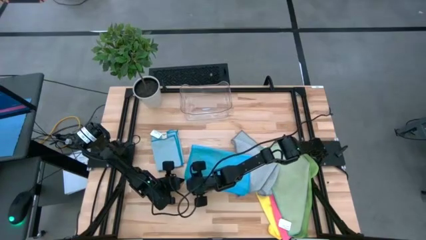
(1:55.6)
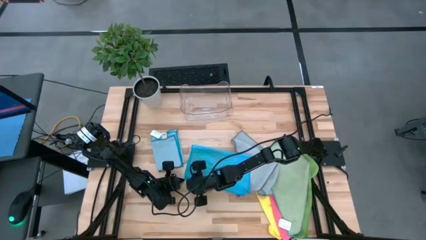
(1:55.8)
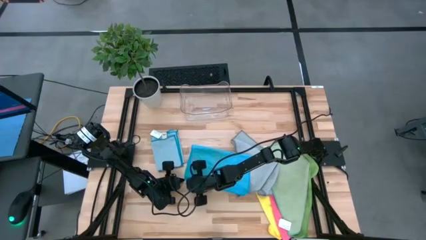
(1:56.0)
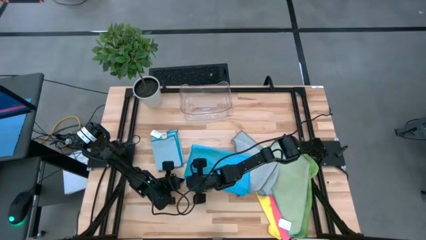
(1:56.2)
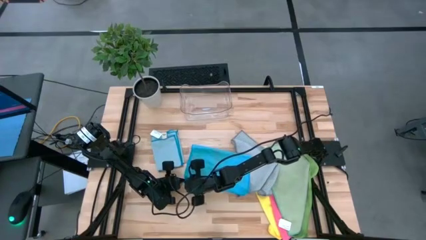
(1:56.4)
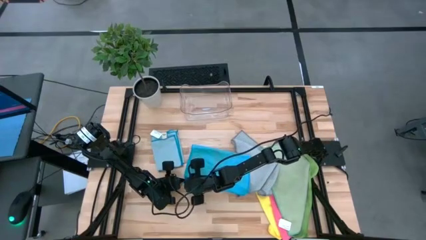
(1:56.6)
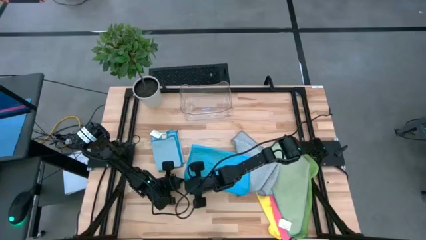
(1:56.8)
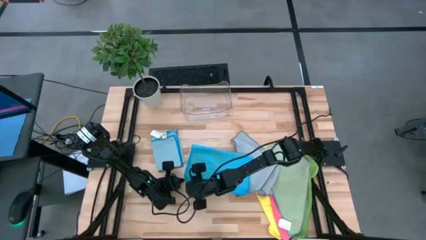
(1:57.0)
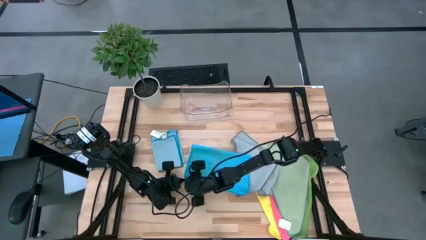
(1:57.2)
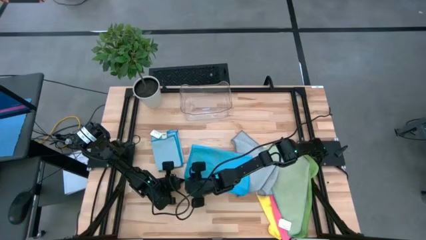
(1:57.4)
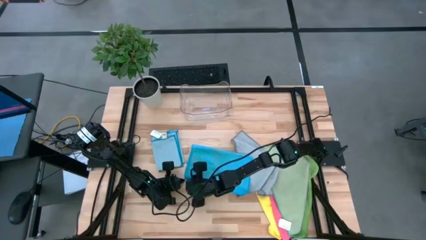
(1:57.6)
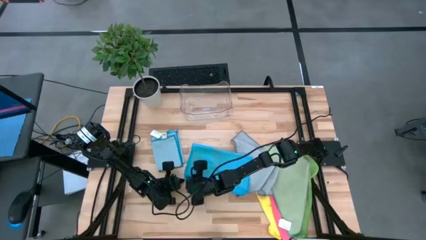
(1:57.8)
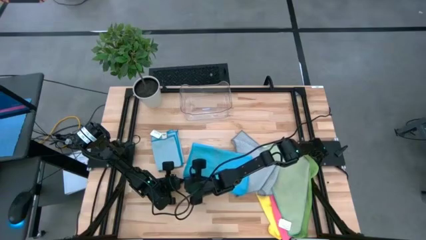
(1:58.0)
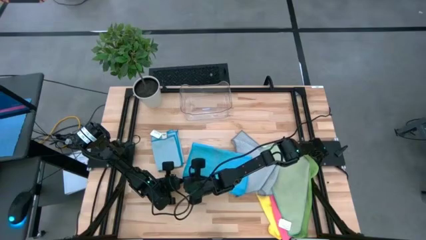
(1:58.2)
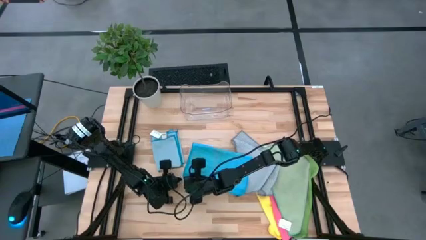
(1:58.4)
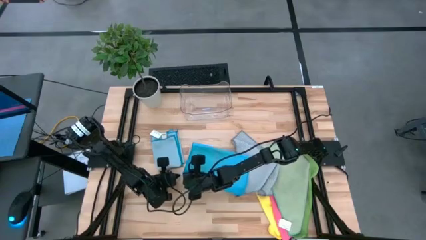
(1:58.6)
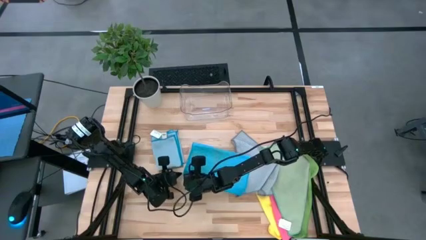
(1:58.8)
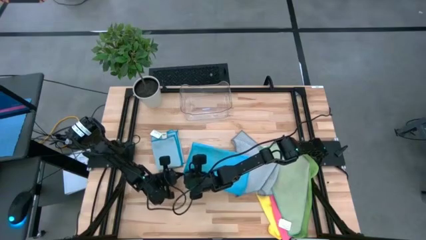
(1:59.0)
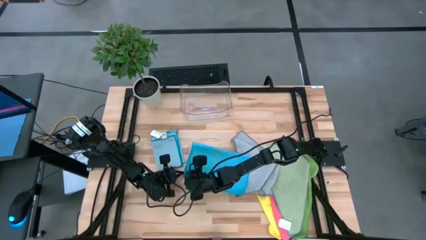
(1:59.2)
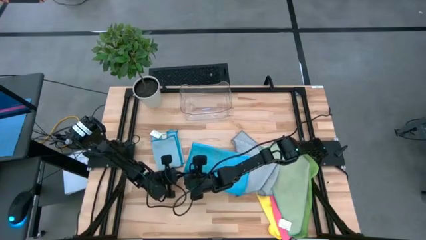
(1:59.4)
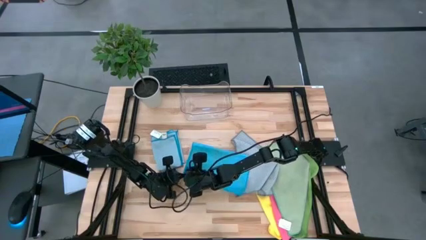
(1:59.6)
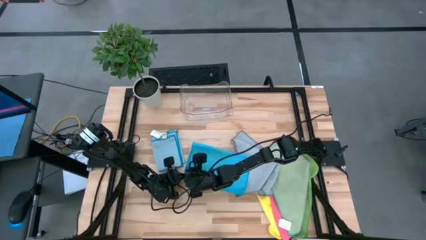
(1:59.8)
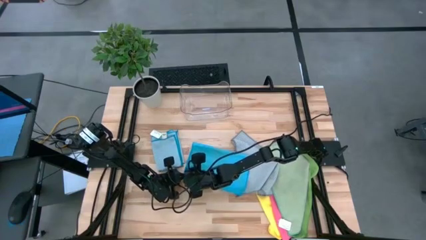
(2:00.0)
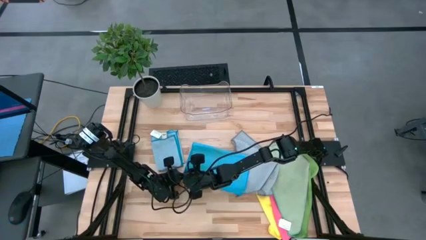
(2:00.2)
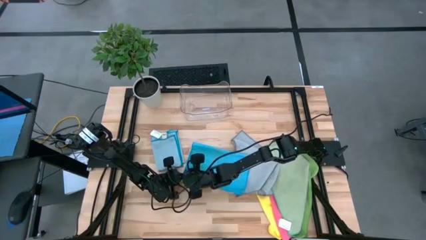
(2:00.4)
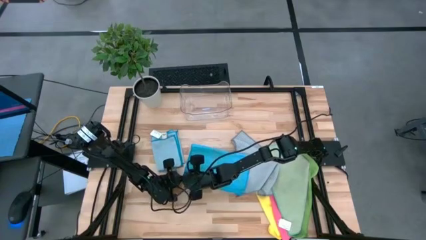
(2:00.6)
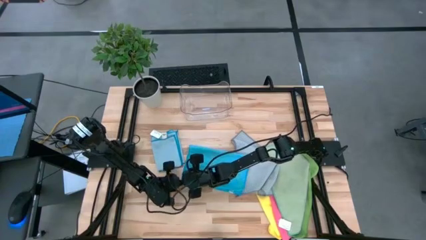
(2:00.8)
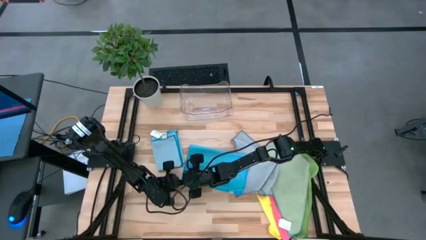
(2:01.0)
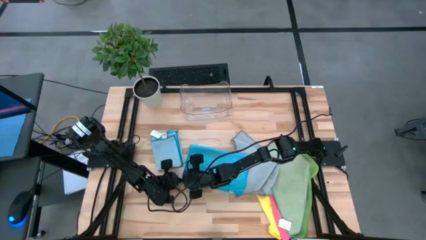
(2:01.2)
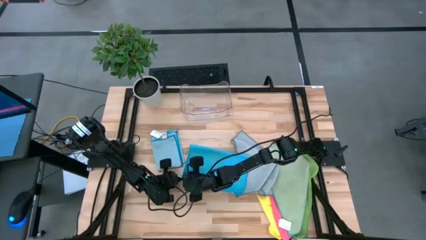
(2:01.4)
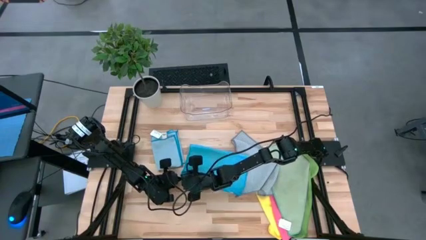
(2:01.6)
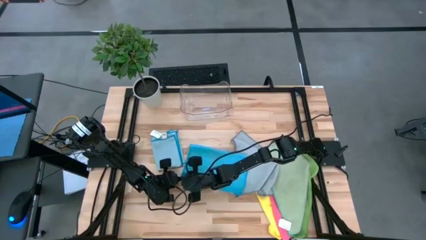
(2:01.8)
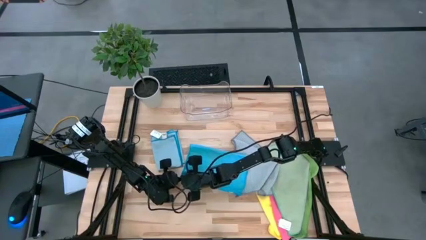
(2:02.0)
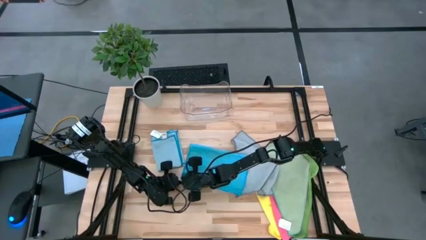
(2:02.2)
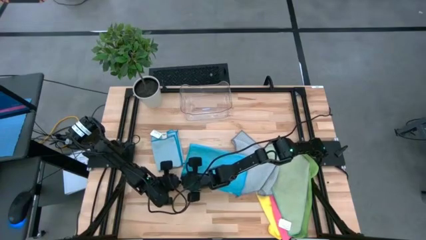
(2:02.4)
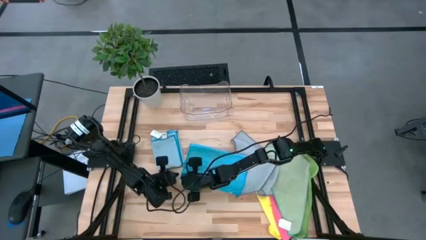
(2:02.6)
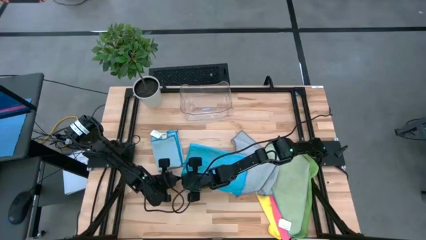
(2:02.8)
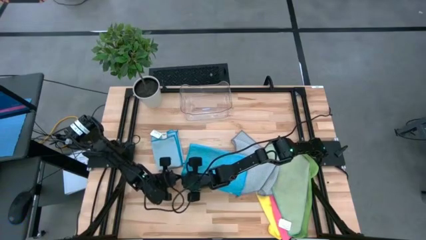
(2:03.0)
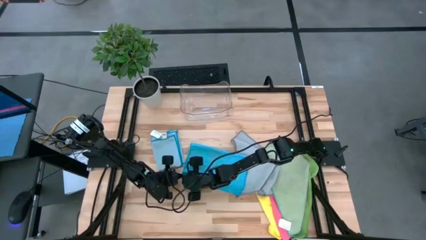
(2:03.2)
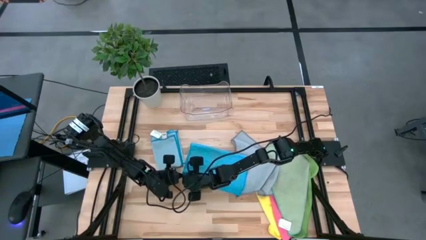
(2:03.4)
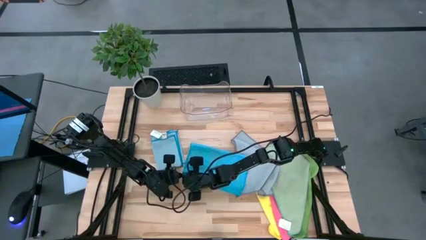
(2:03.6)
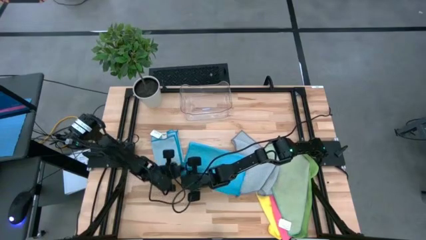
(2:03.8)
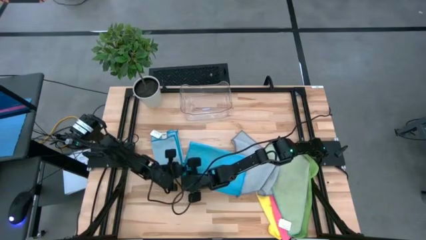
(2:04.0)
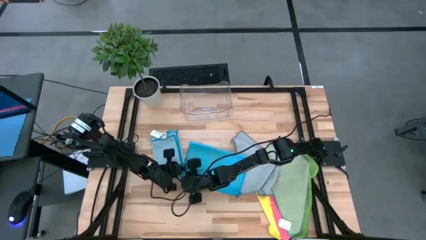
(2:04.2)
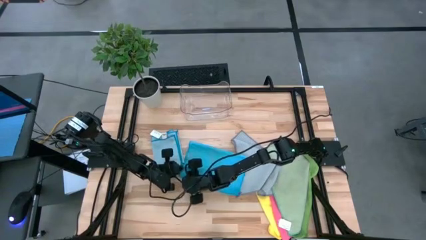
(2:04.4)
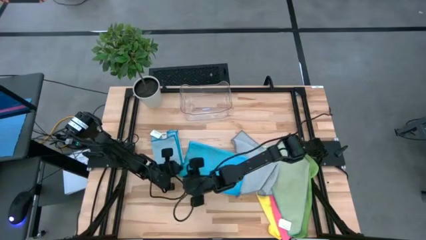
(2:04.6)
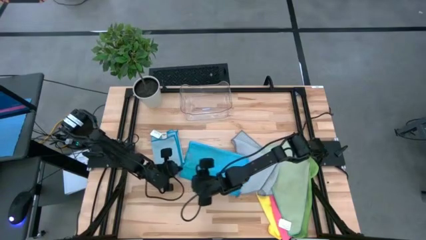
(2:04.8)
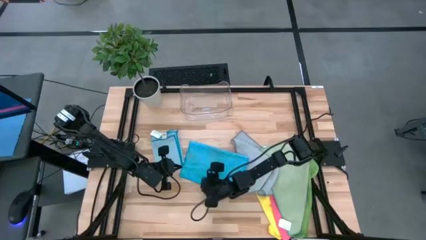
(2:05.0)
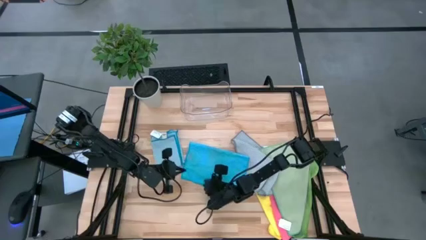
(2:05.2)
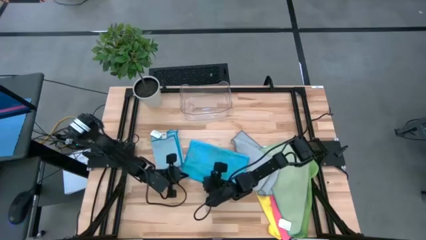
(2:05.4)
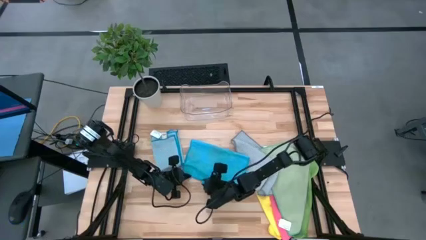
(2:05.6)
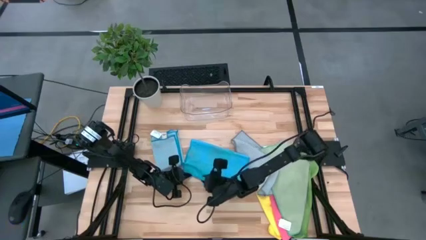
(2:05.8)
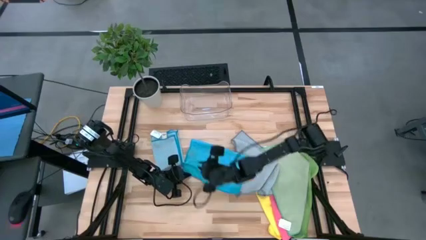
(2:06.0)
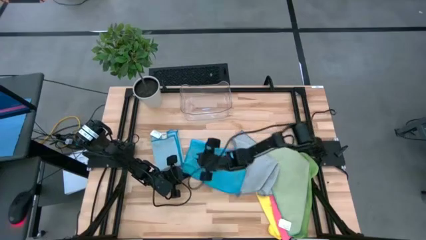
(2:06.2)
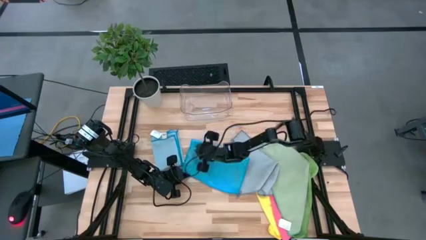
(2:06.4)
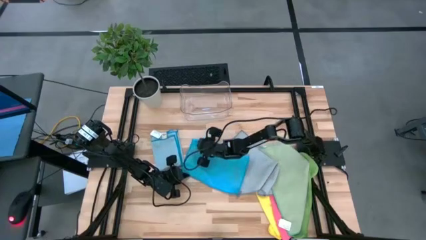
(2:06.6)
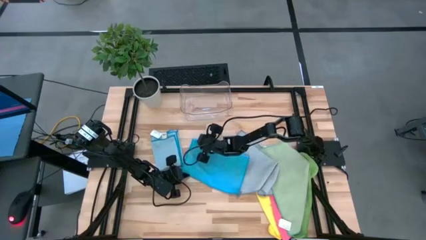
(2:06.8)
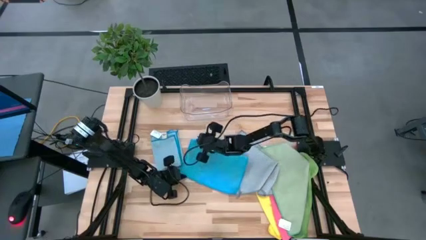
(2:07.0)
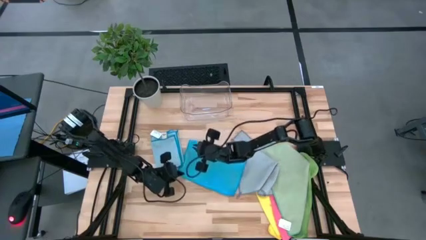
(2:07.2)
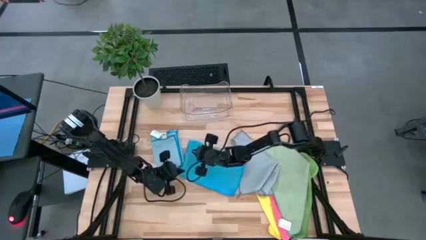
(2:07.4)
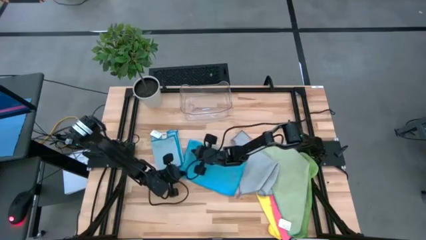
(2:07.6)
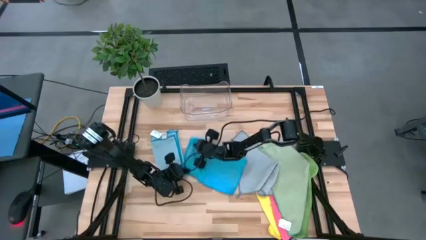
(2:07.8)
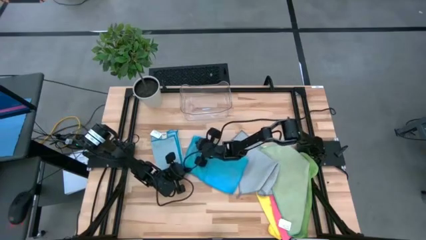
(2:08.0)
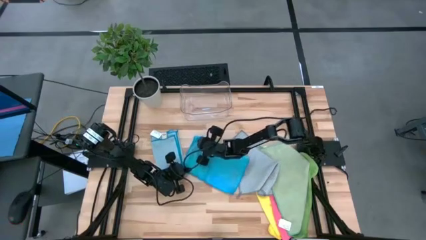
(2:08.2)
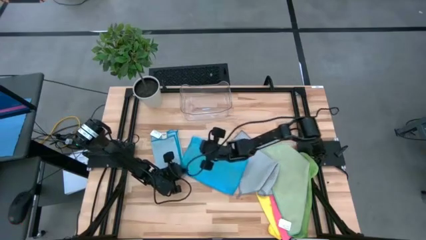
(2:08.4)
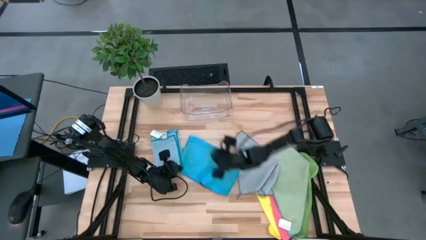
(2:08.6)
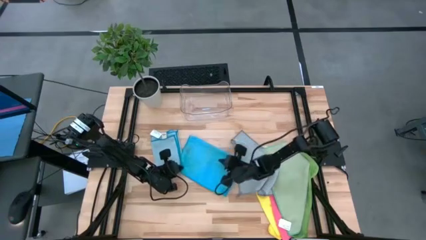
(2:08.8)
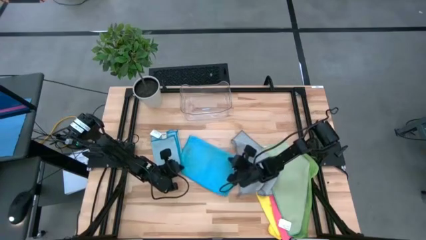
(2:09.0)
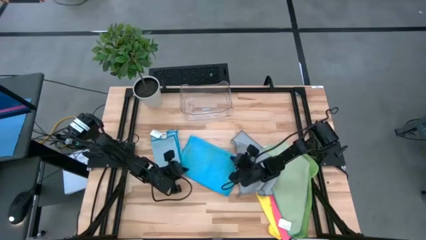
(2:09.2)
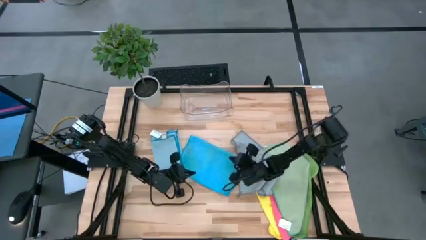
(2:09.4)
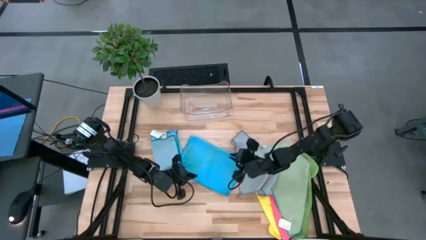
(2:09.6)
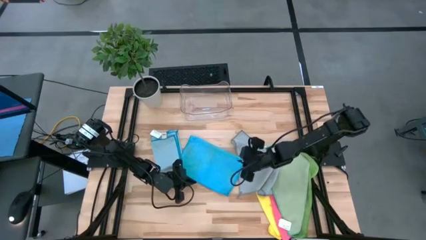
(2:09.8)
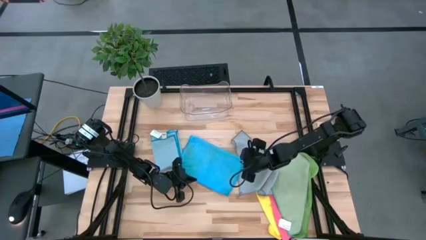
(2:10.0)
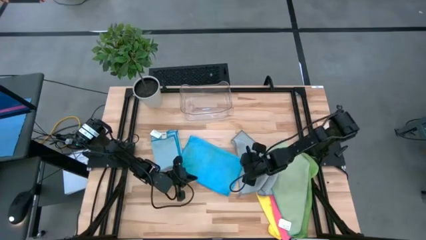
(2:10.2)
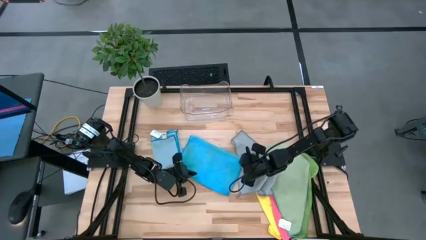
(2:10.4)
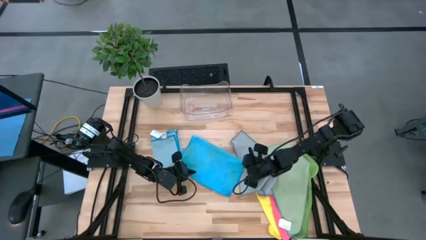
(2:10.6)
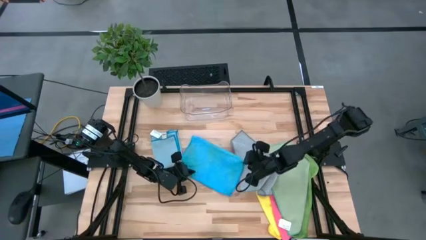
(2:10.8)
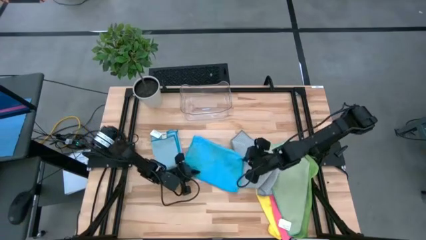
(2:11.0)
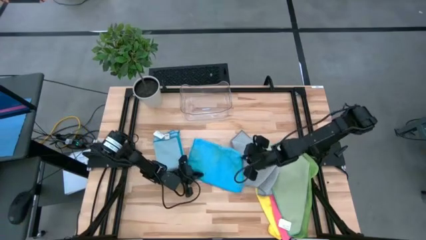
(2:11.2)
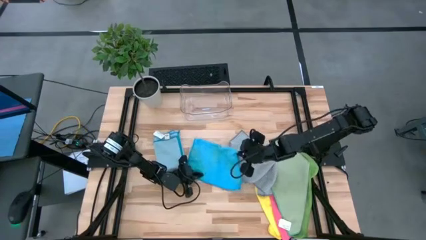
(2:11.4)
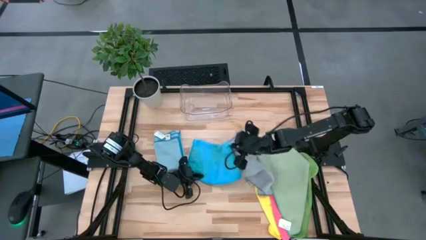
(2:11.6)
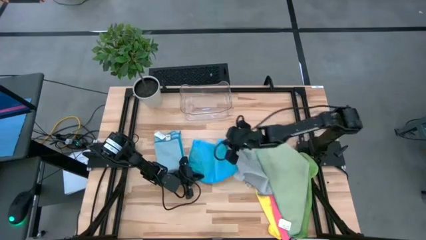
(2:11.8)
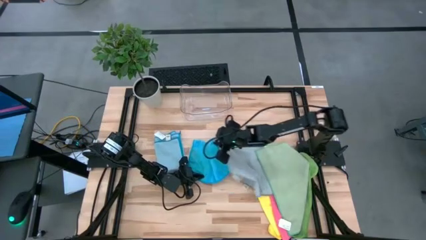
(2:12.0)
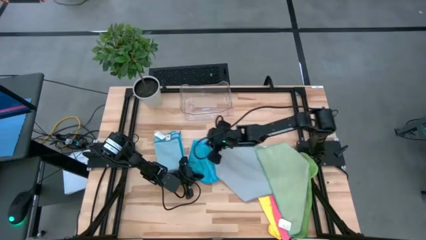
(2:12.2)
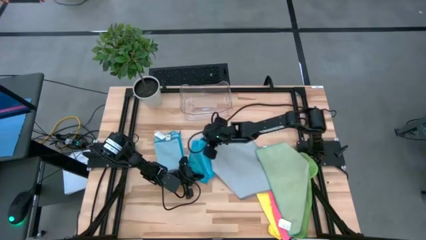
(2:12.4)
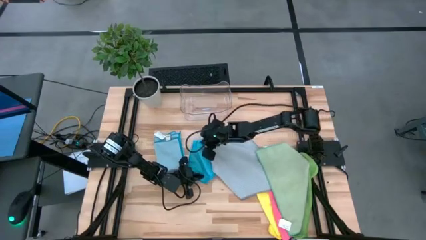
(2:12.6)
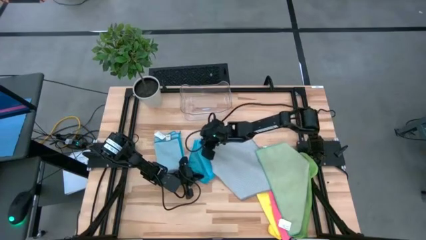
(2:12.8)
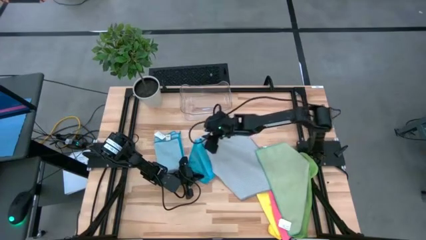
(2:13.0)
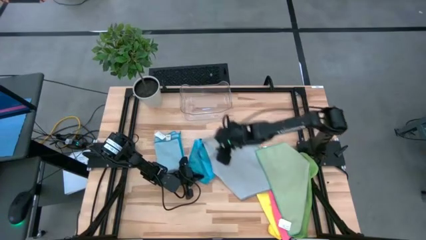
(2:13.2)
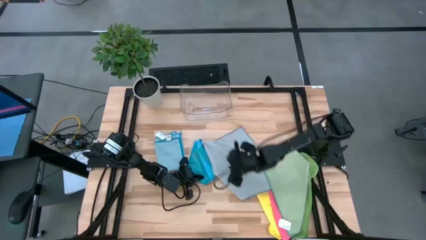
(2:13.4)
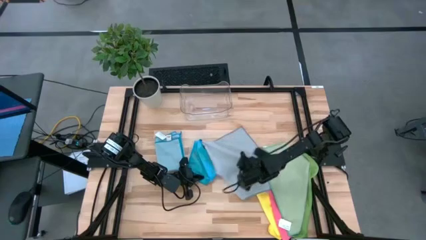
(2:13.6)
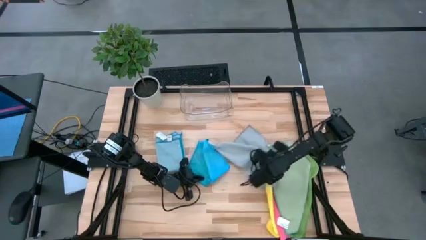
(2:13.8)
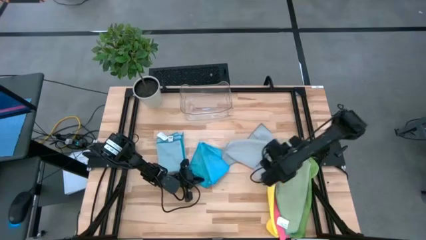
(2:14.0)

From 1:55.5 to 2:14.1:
Task: Fold microfiber towels
Fold the blue microfiber cloth
